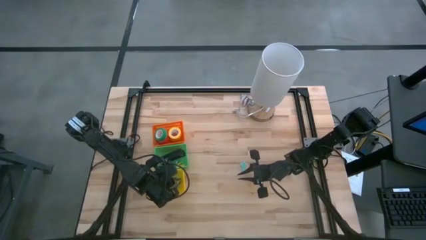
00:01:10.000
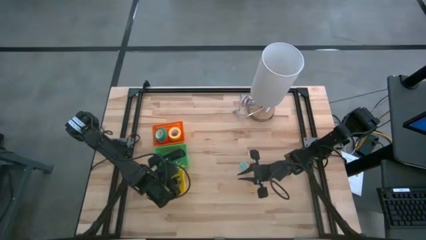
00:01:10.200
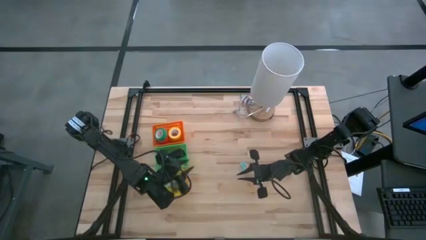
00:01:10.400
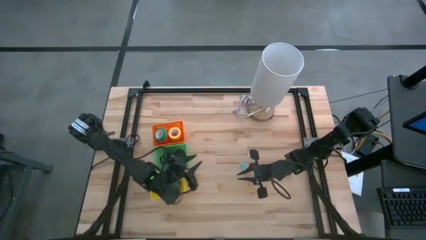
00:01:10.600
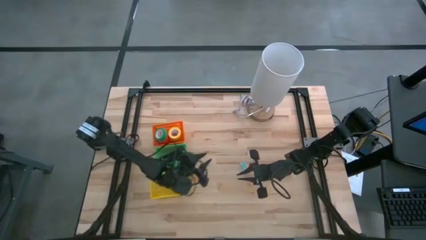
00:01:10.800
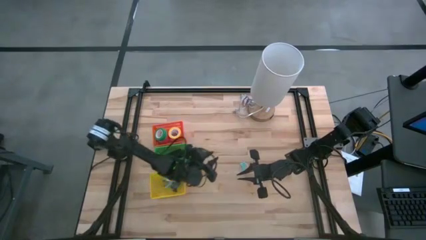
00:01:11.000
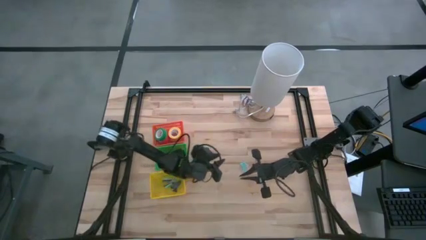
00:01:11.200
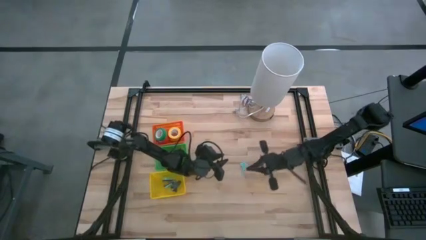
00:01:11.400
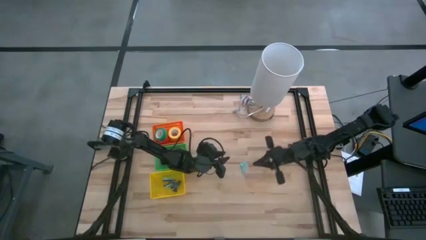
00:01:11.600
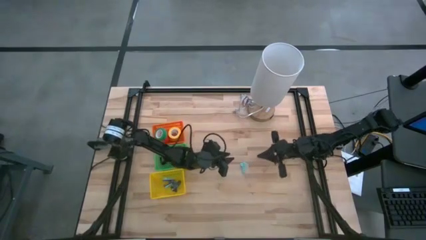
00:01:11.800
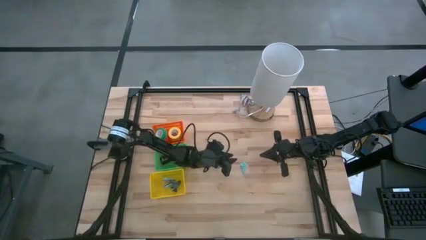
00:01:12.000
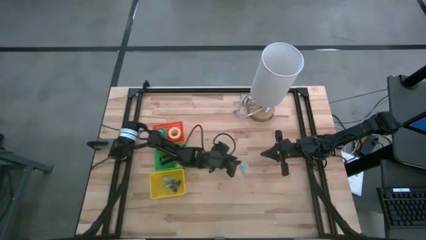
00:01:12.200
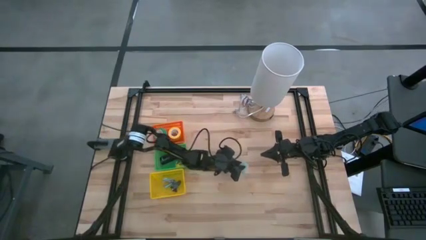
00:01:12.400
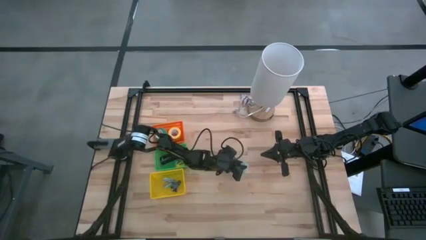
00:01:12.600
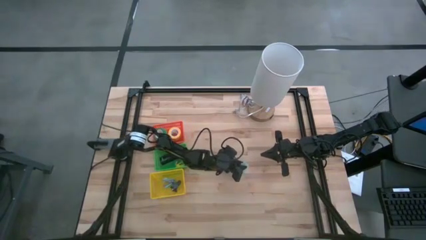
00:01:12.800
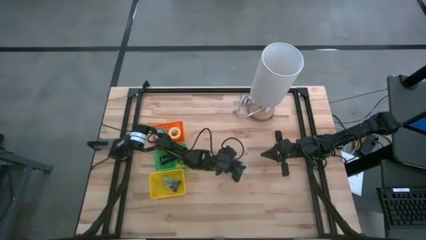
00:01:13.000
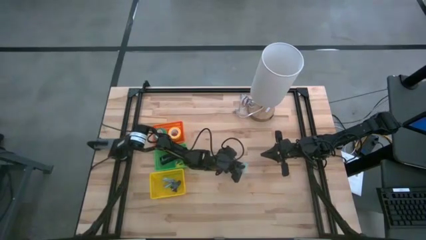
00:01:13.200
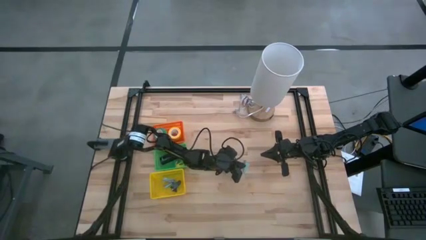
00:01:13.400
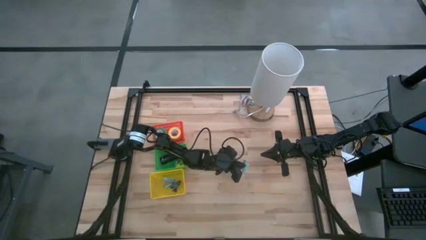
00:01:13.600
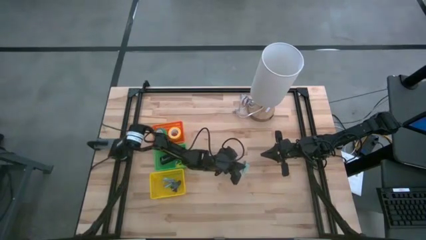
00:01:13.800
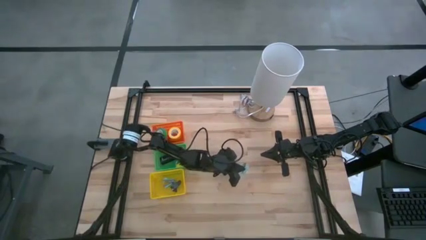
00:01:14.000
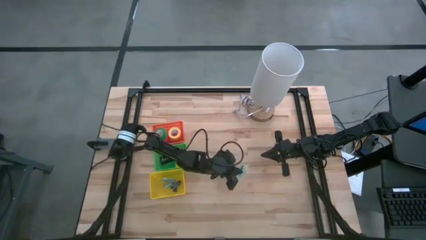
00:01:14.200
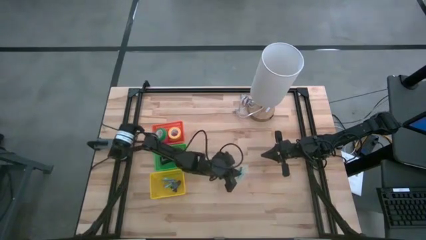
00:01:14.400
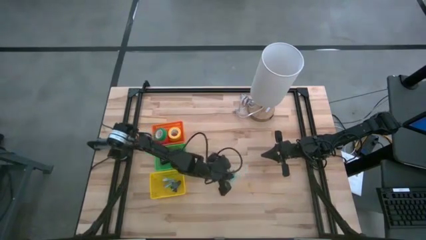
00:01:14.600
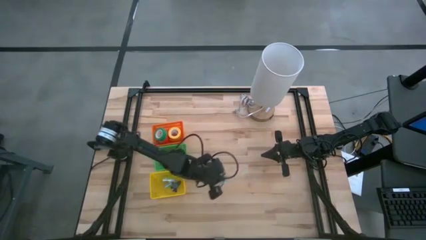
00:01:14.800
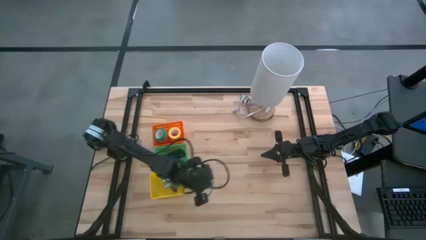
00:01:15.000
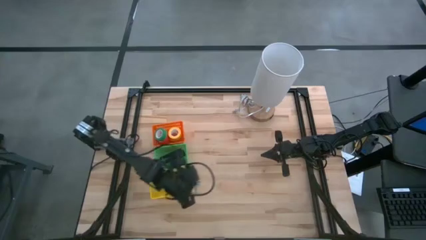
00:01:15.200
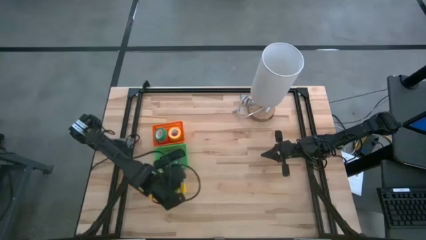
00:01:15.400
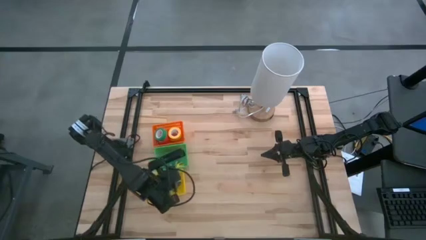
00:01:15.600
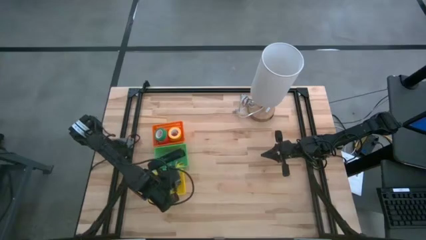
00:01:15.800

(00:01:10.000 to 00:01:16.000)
Task: Pick and place Stapler, Stapler remover, tape
Put the light blue staple remover into the yellow basket

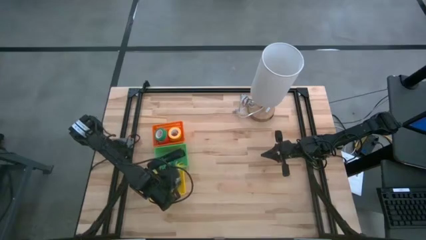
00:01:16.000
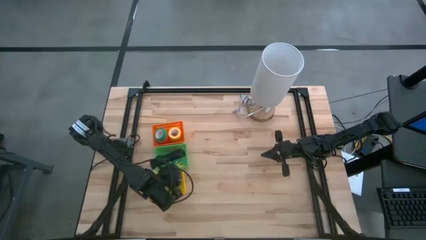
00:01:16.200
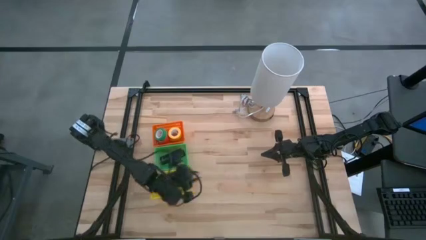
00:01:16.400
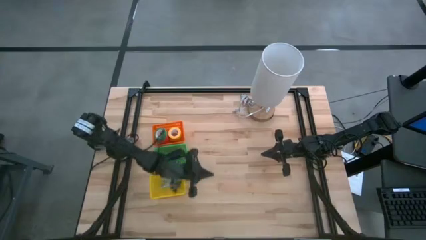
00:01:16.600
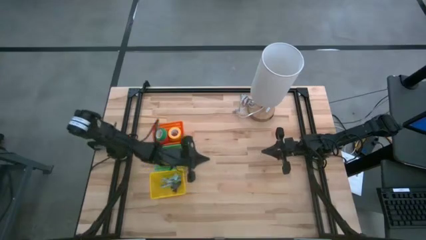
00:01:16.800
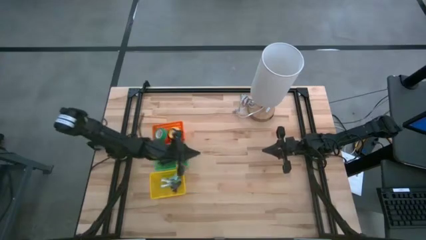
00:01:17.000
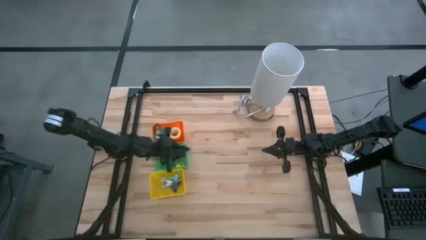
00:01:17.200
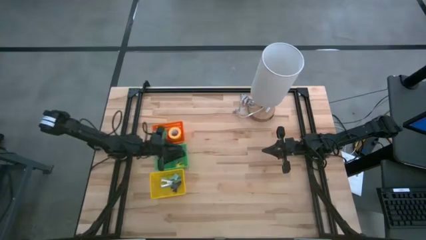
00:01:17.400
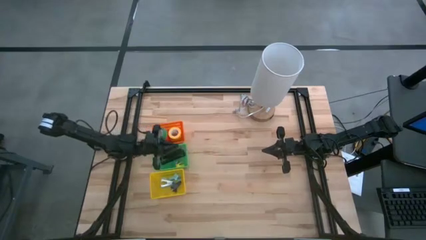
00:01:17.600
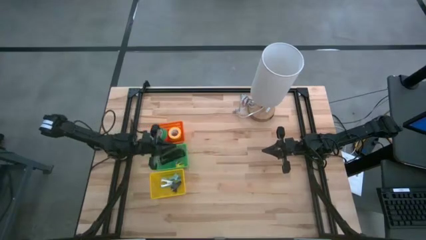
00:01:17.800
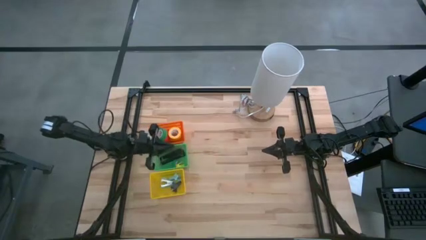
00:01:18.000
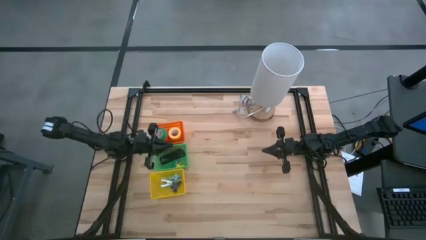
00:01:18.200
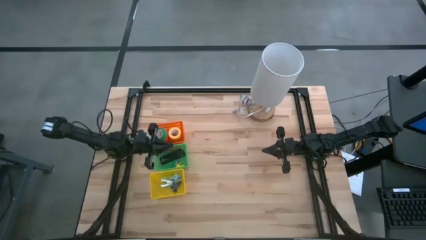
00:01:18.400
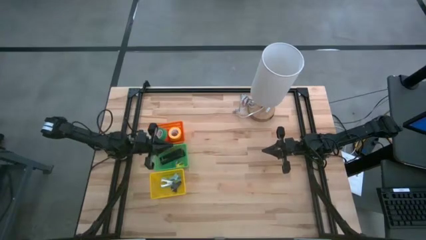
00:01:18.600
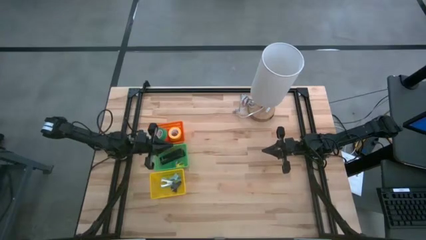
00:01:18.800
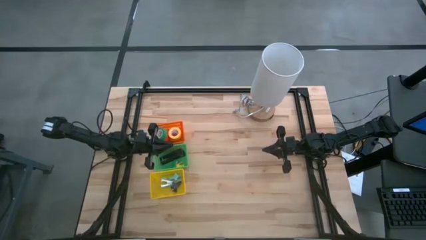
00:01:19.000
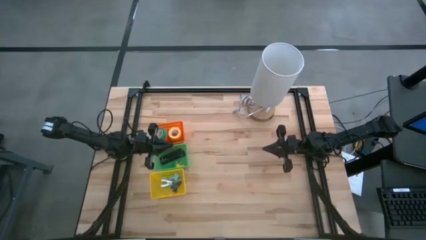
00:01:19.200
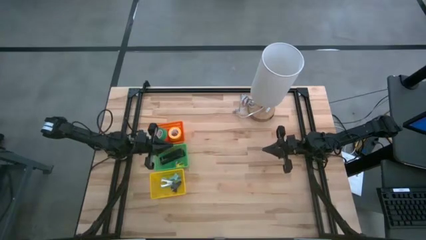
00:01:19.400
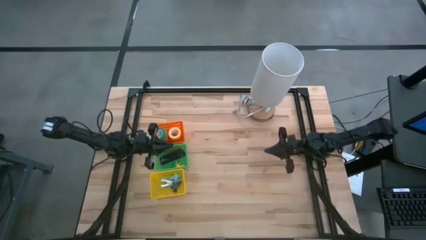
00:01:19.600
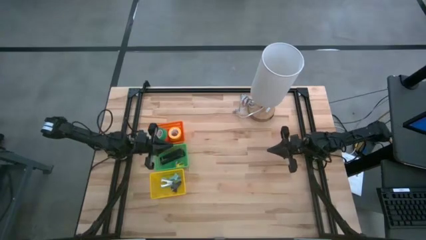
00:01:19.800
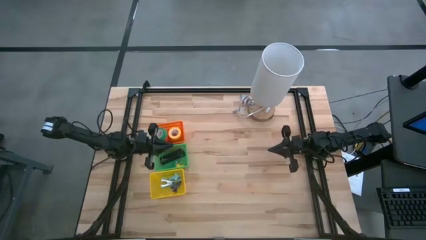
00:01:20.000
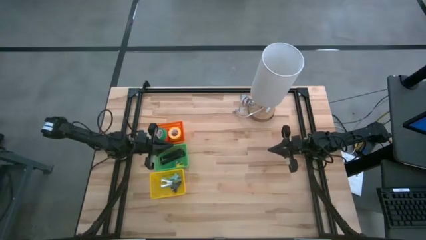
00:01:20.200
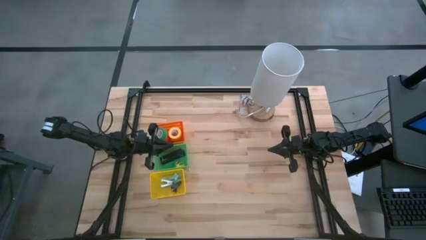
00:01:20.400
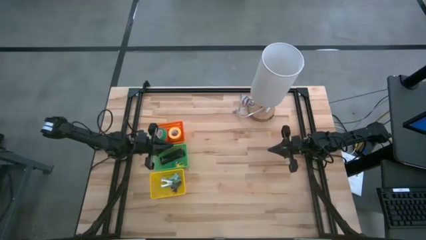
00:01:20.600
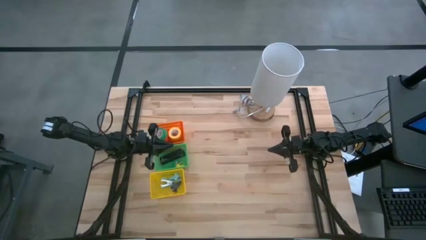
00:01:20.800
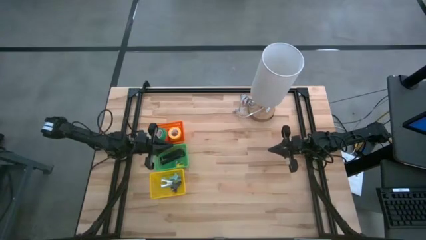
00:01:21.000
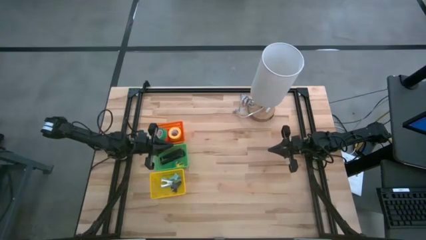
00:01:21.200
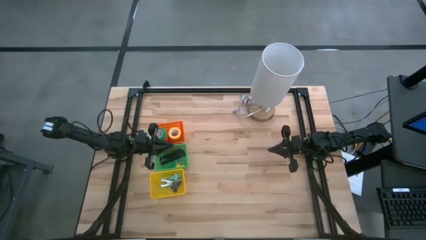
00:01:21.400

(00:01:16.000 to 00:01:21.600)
Return to Home Position

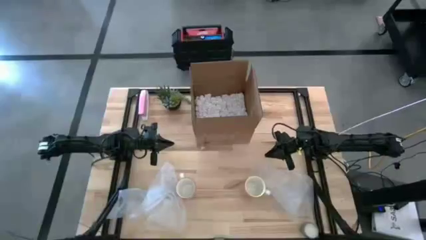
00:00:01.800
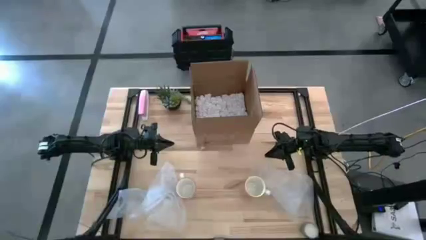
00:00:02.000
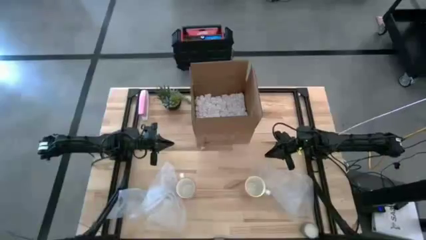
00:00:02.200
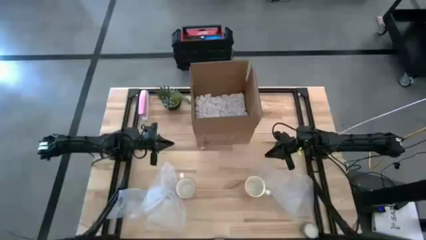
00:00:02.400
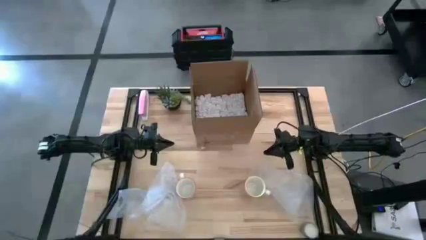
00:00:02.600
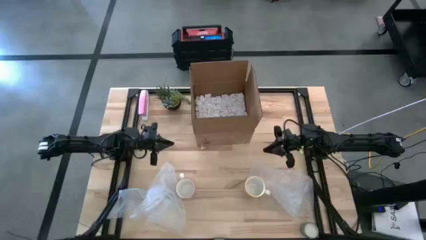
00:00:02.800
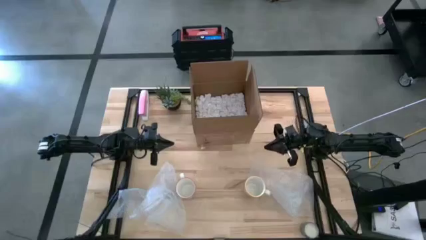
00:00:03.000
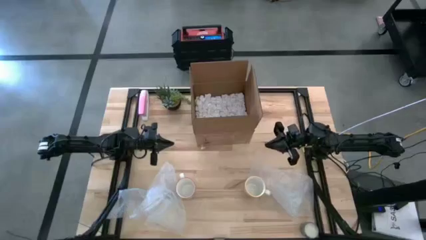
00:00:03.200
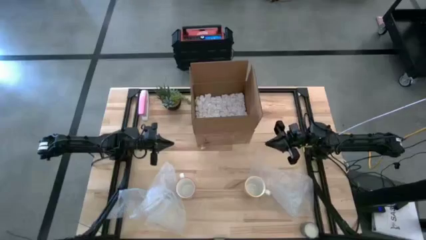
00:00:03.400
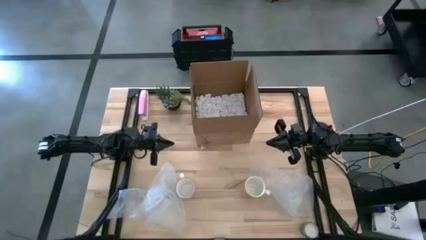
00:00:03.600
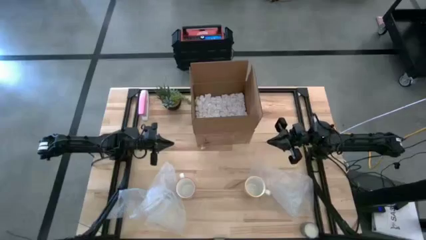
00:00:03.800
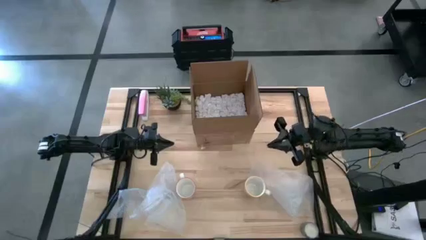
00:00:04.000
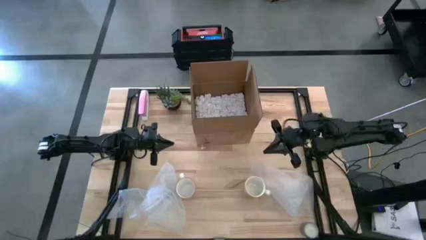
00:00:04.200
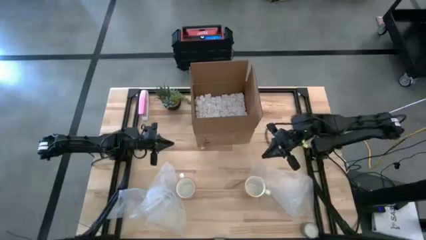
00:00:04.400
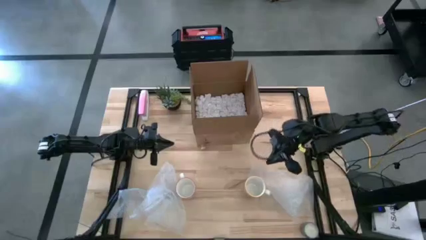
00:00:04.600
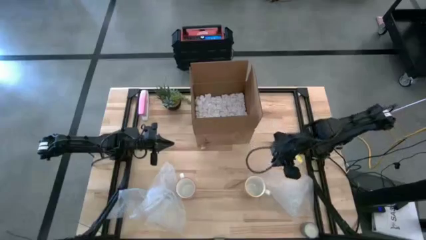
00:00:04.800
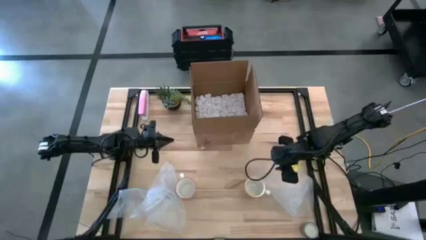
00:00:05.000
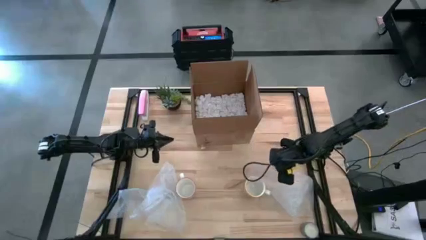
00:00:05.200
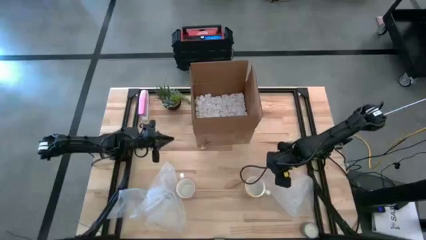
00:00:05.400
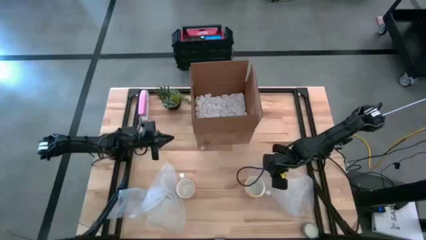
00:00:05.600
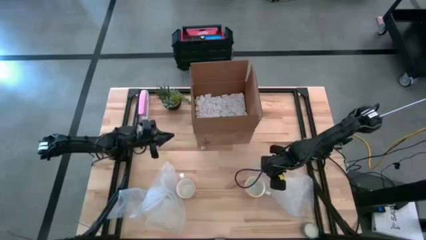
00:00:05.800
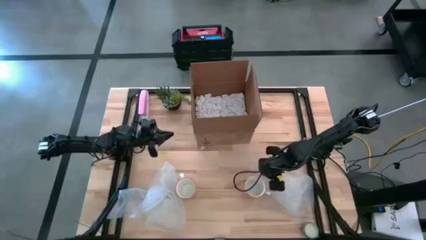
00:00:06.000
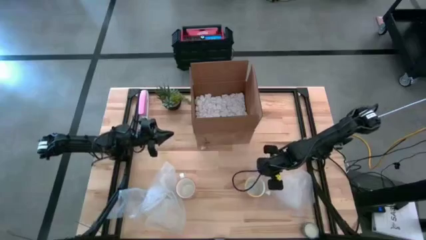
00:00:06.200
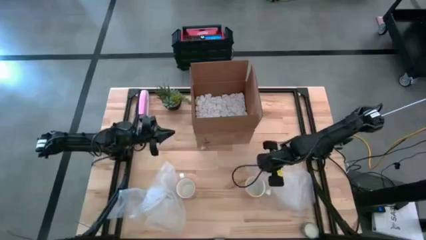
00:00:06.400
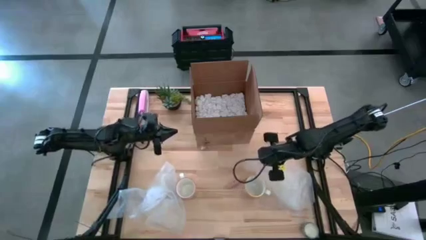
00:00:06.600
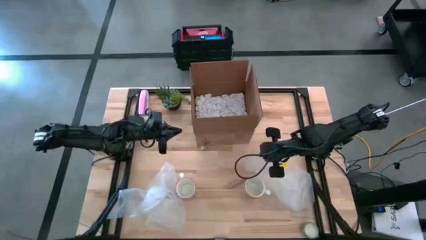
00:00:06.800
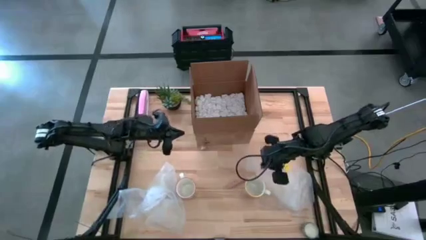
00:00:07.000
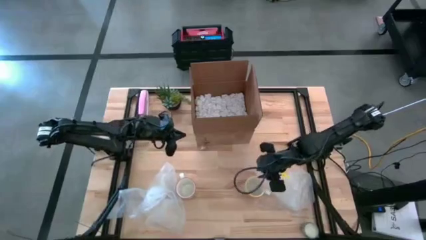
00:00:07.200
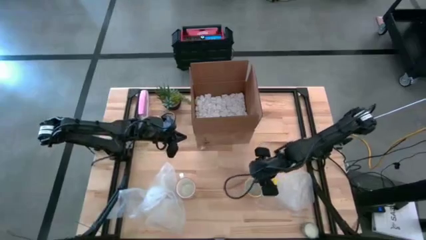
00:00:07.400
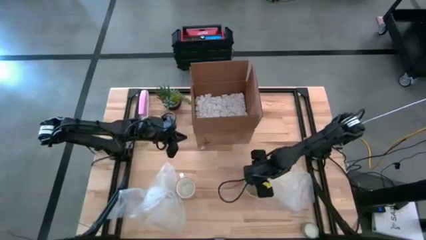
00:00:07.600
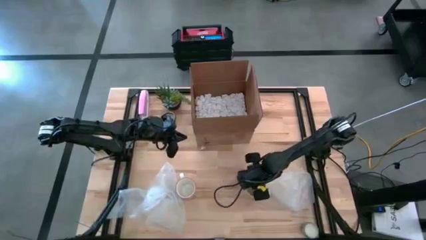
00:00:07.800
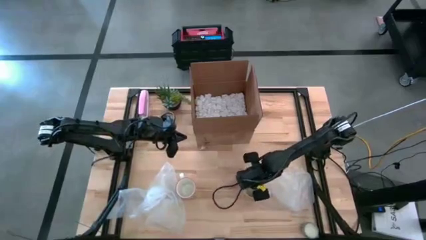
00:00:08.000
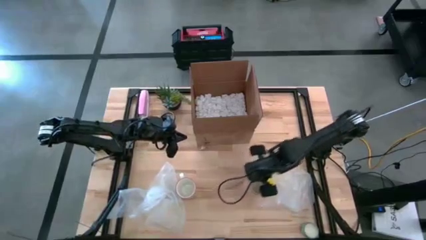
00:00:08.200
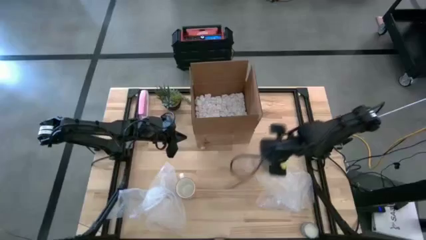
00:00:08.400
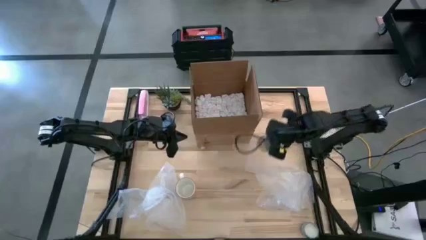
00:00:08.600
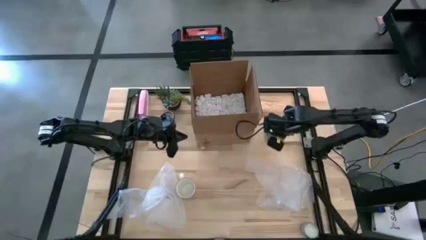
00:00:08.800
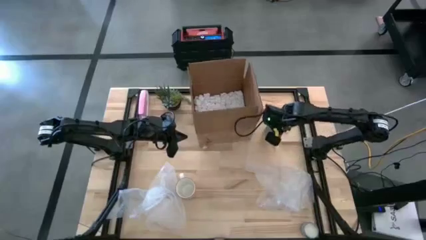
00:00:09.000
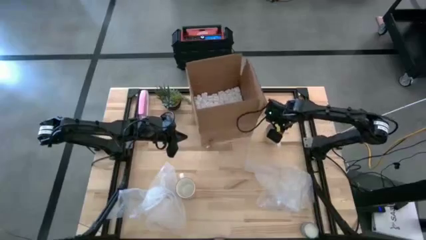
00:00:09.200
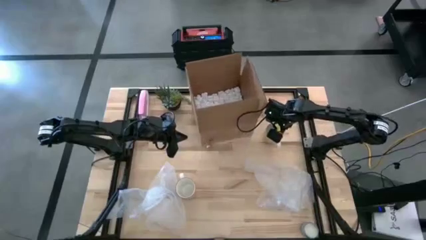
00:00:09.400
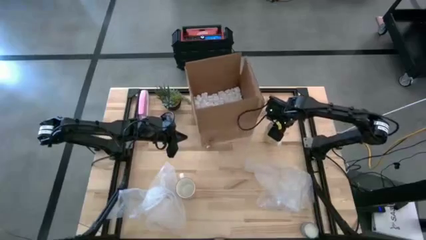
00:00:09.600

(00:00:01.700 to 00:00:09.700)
Task: wrap mug
Move the orange mug to the top right of the table
